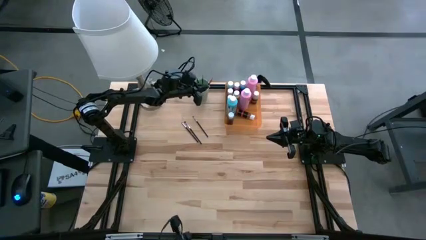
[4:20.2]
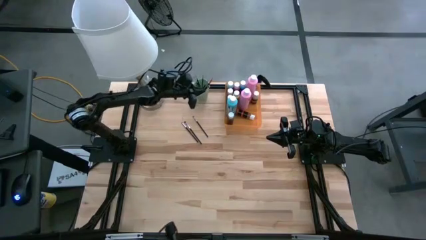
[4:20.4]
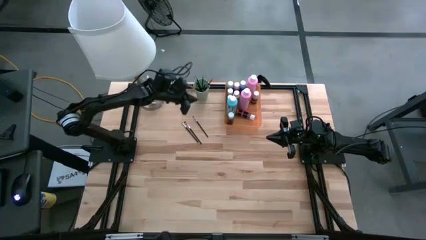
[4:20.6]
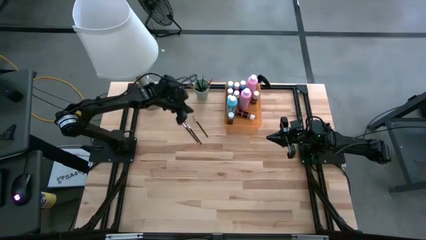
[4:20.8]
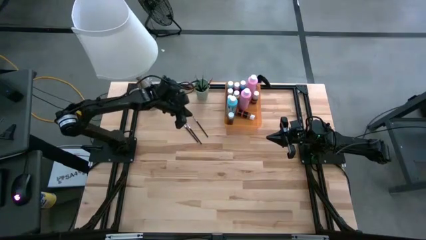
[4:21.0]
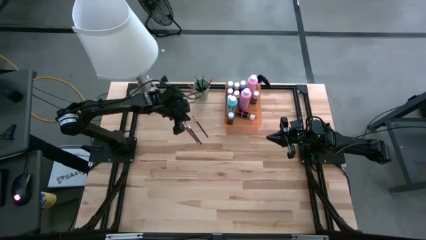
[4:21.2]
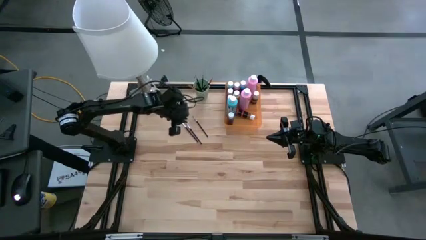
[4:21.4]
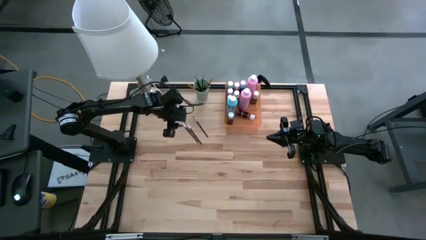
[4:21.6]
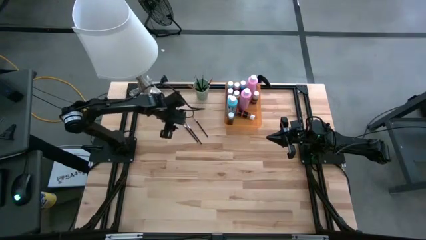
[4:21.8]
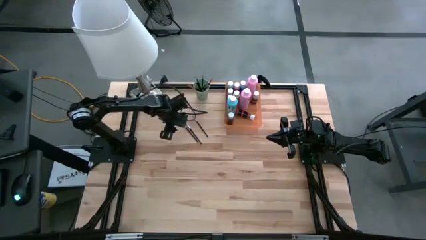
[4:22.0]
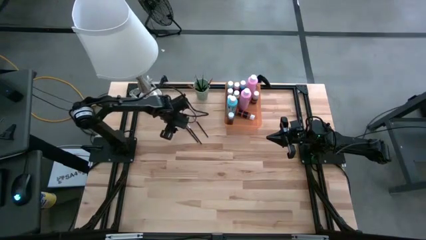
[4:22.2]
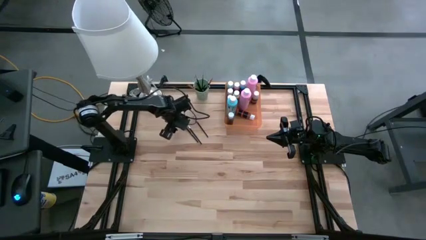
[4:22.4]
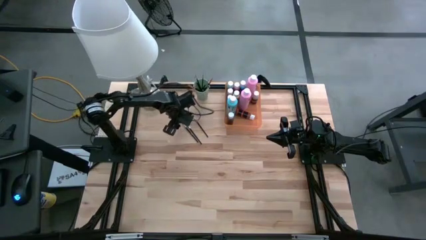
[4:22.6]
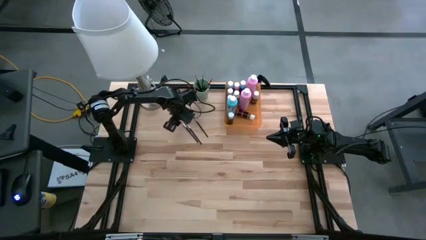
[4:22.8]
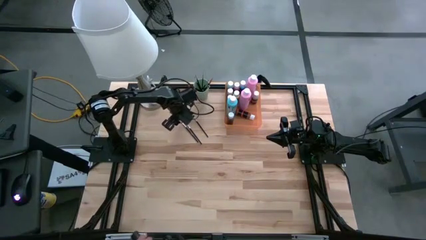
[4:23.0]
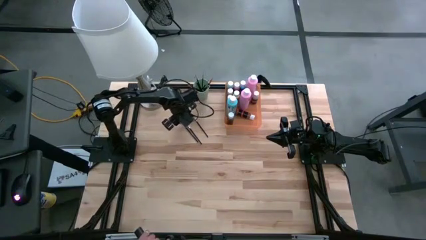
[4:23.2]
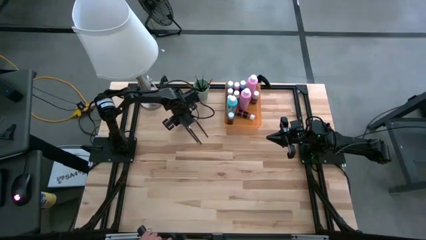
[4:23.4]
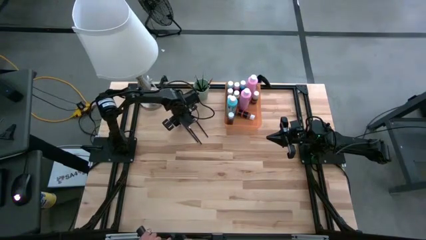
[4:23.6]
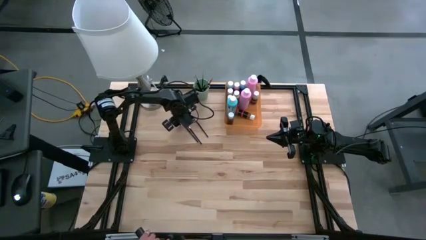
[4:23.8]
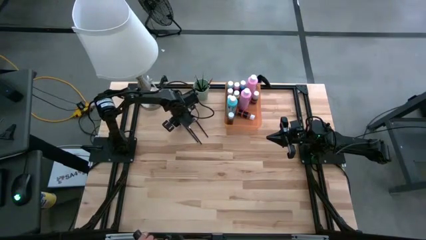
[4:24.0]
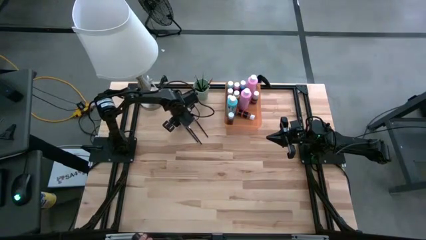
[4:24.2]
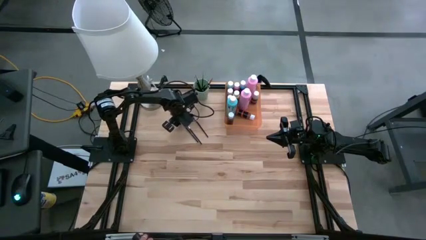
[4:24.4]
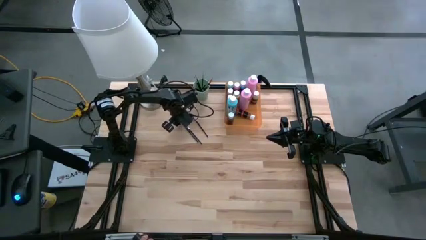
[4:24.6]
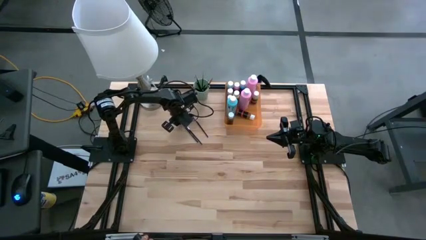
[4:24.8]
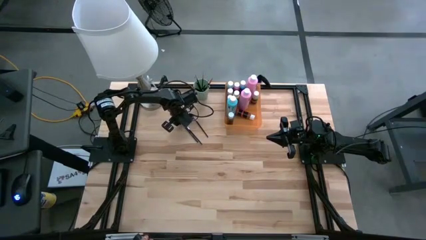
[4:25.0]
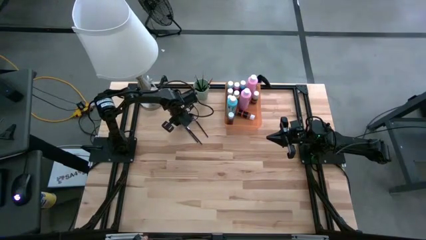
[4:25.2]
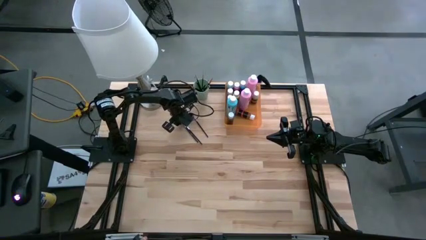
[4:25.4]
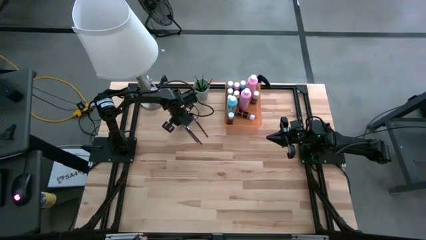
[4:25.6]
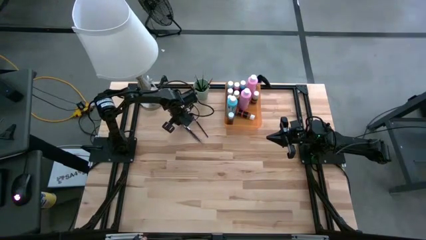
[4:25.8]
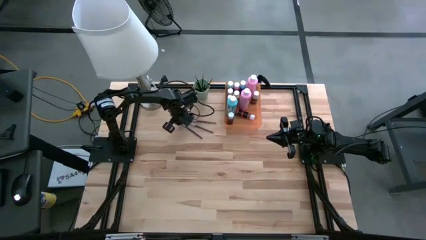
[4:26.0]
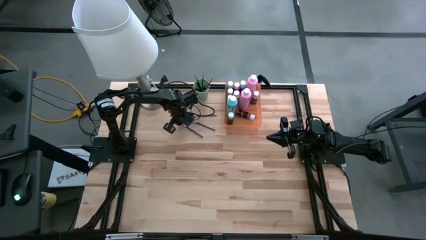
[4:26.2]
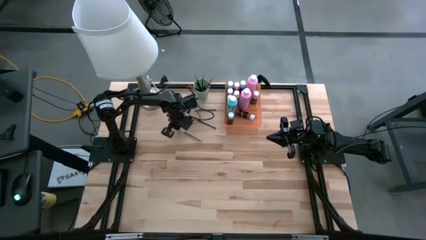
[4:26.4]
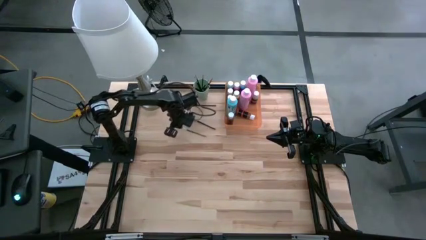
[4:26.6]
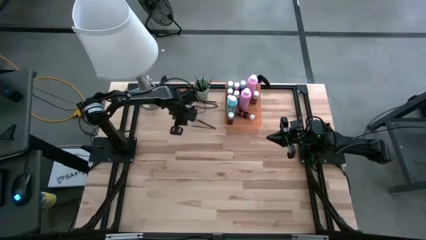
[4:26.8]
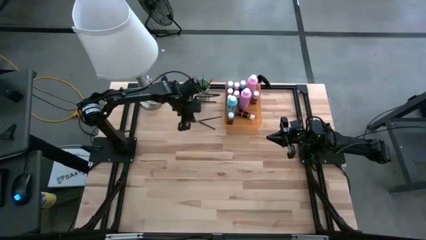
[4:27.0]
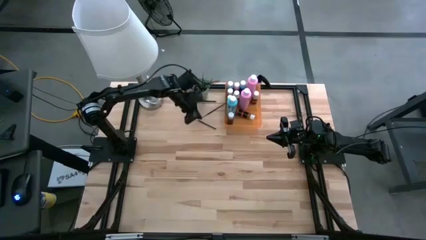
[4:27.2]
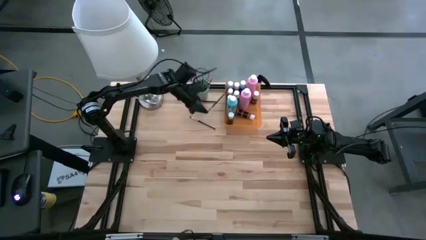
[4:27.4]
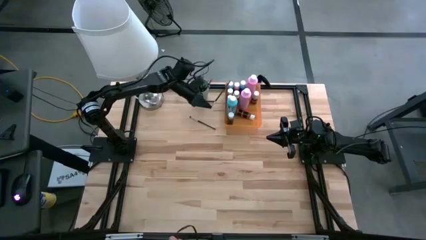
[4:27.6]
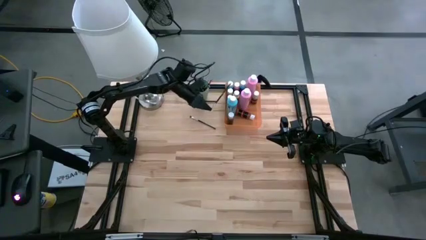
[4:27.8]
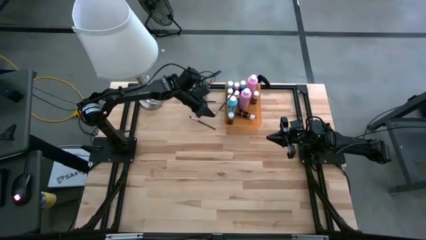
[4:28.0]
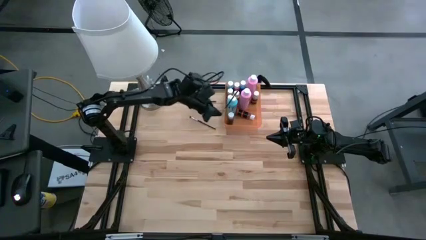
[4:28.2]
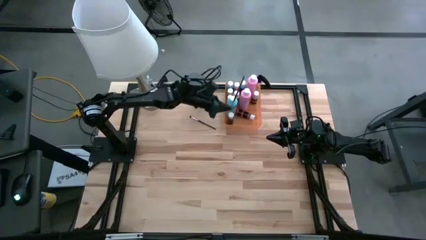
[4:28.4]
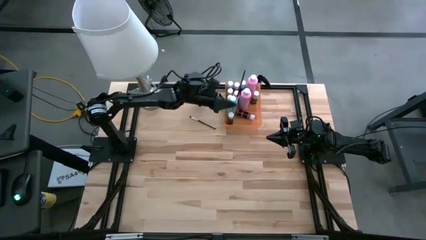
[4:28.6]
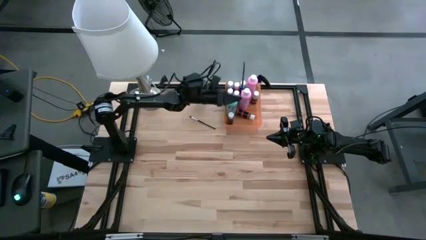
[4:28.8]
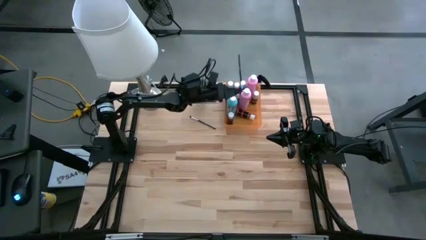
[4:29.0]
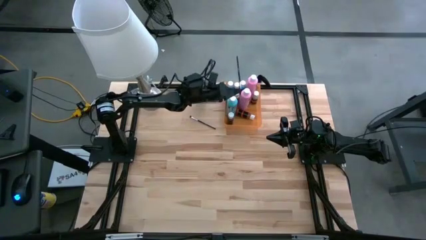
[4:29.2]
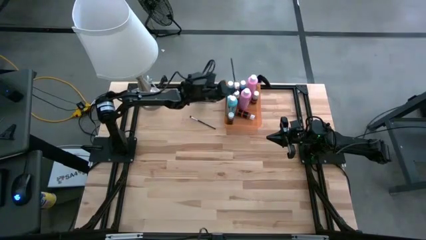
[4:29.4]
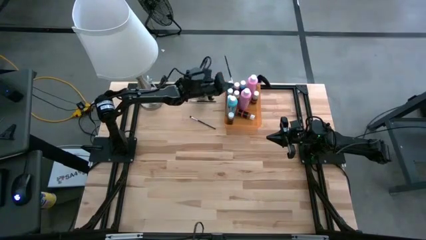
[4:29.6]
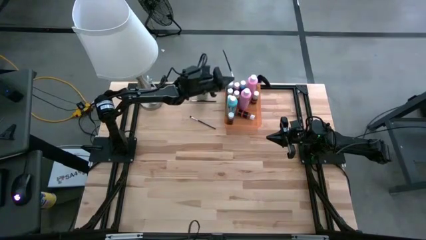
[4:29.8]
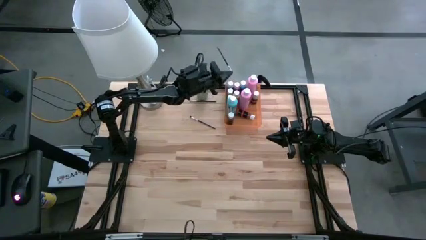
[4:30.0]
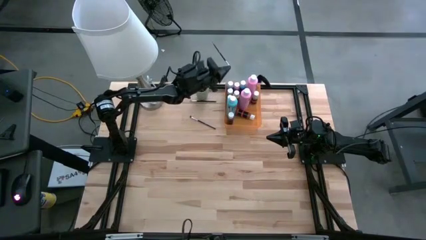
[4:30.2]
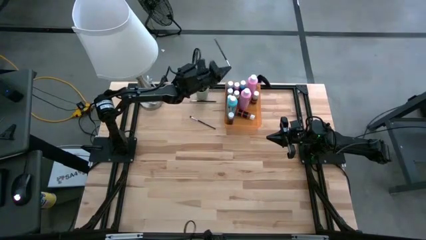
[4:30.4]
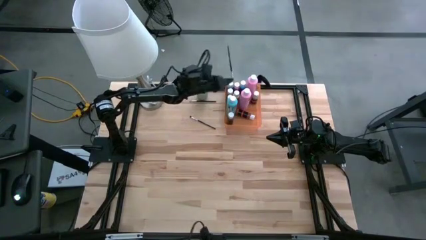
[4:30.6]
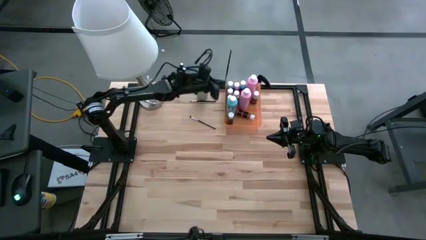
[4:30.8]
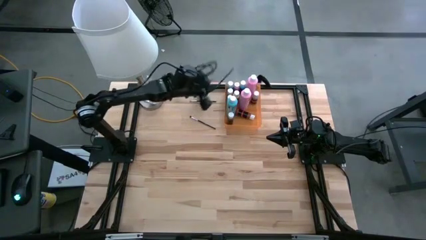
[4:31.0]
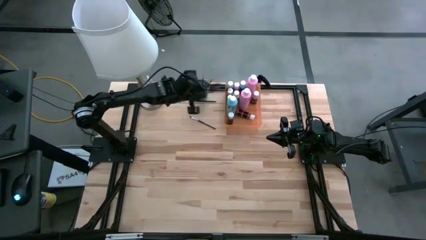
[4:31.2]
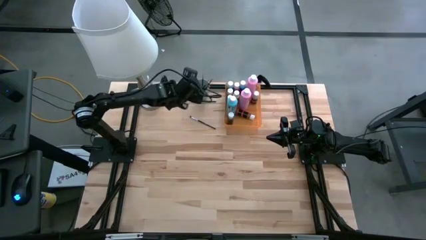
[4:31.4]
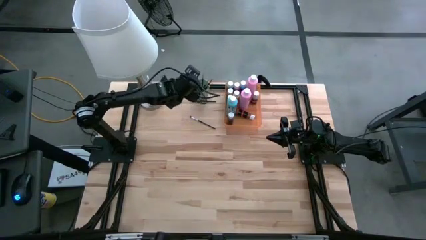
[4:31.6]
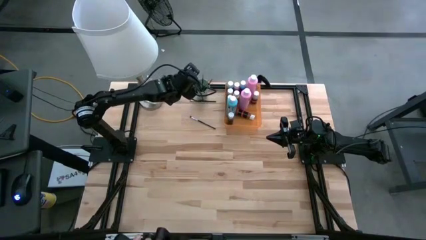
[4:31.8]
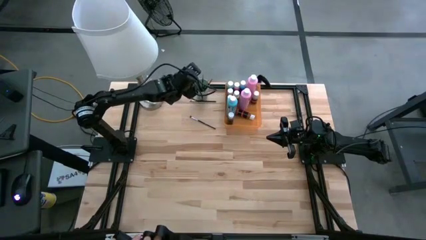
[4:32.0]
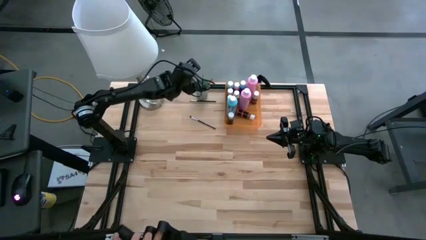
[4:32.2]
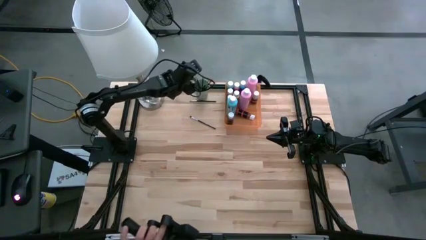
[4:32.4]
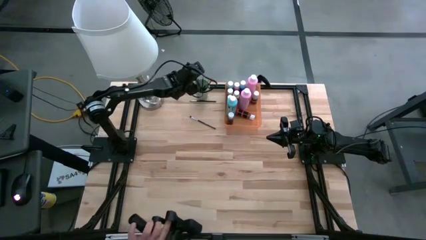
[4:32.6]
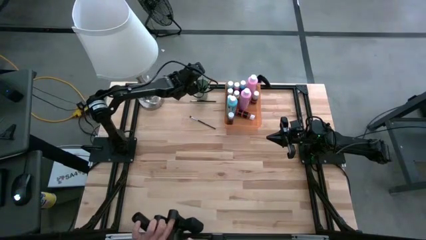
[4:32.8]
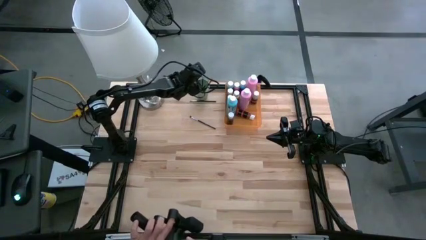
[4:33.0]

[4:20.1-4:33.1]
Task: Pick & Place Paint Supplies
Put the black paint brush into the green cup
